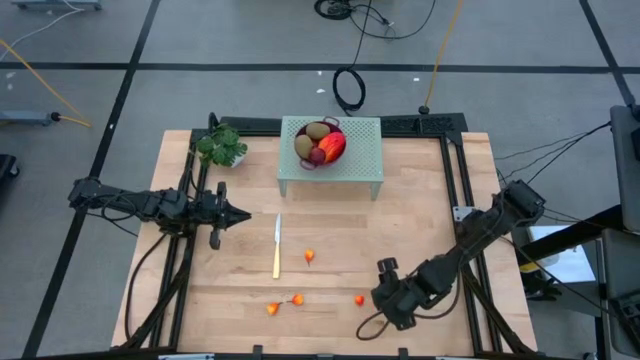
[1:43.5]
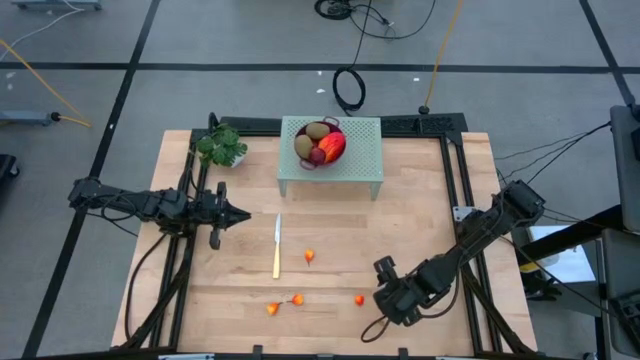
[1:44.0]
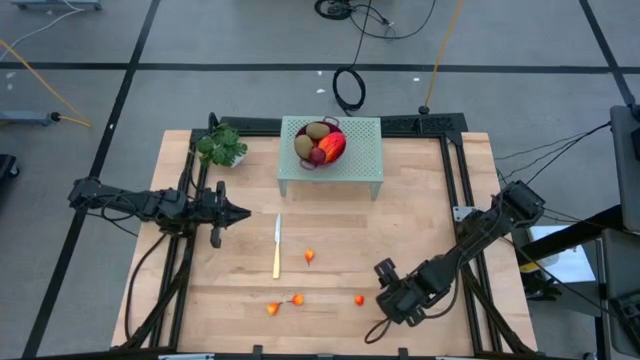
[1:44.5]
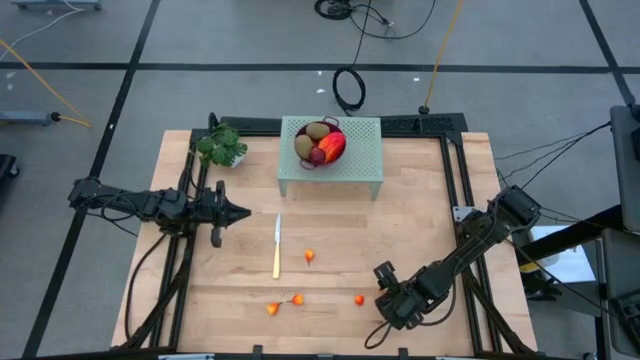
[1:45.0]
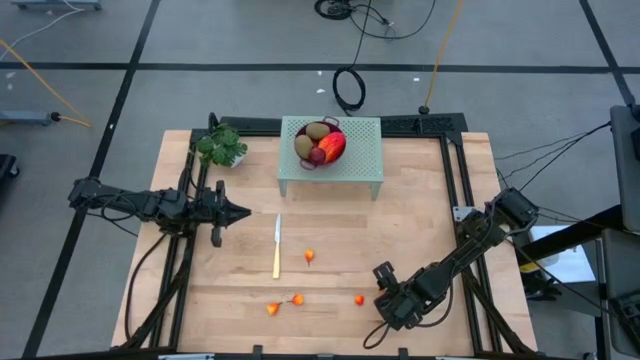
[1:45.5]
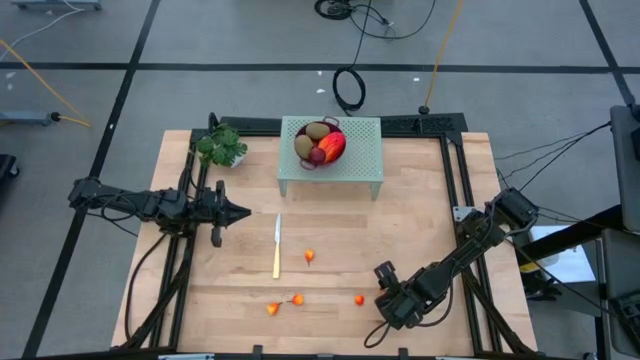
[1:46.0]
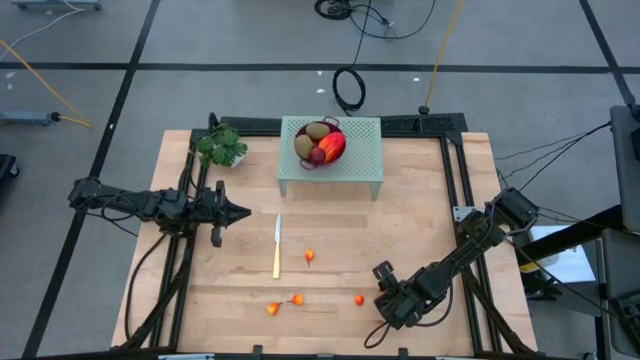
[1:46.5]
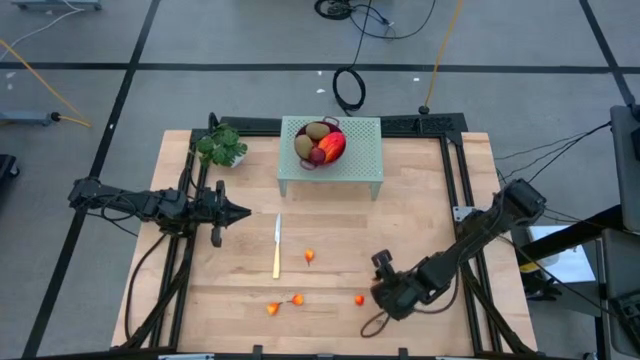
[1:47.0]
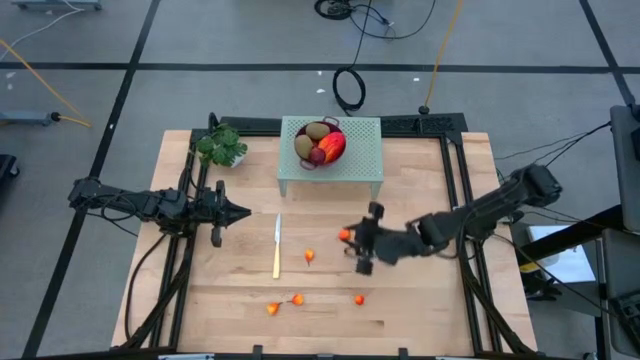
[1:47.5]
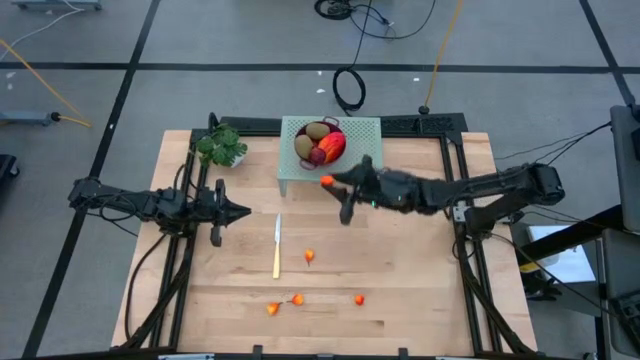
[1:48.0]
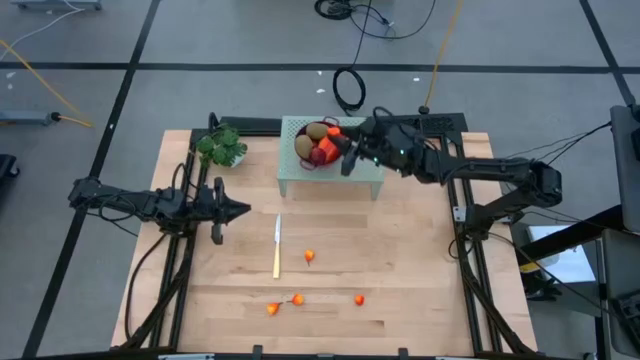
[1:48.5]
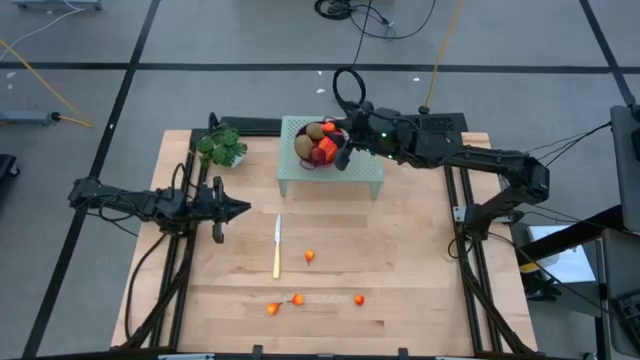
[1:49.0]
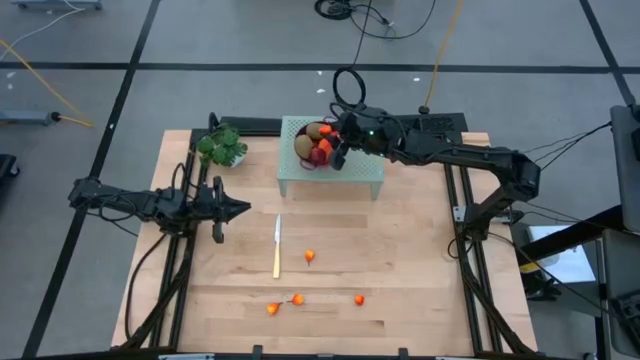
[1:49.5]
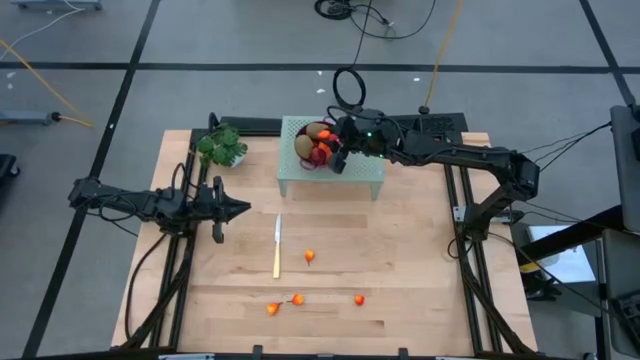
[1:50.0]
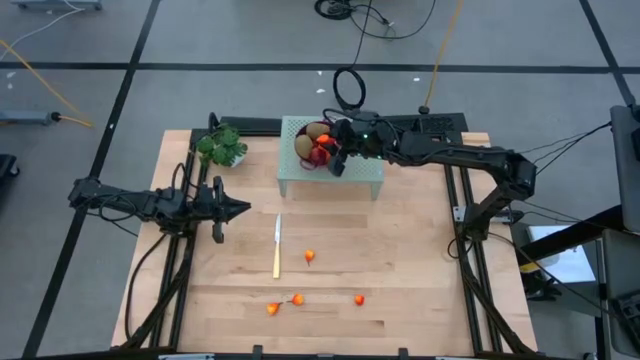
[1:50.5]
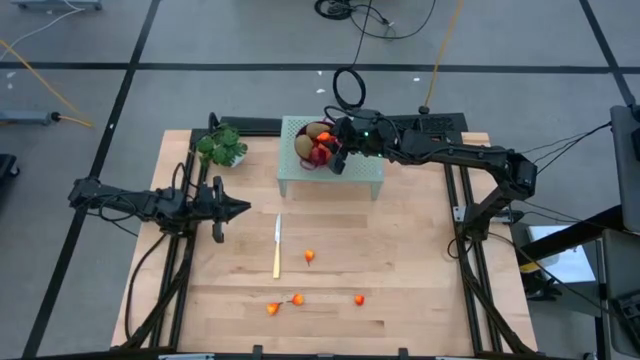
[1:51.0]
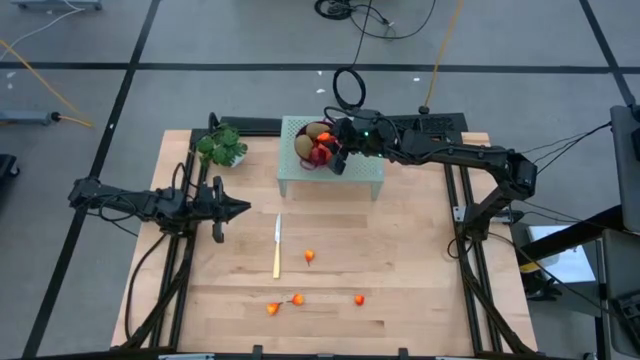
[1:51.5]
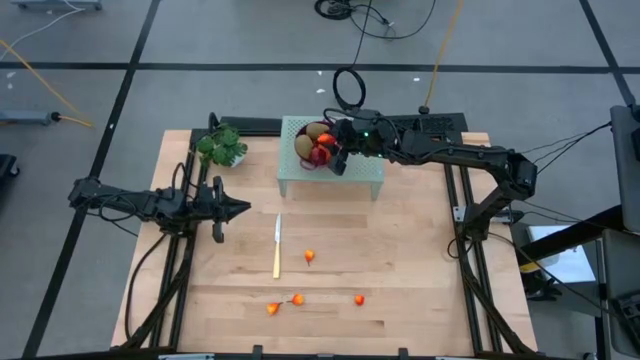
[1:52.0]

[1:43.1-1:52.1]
Task: Pick & Place Fruit
Put the pear into the strainer bowl on the shelf

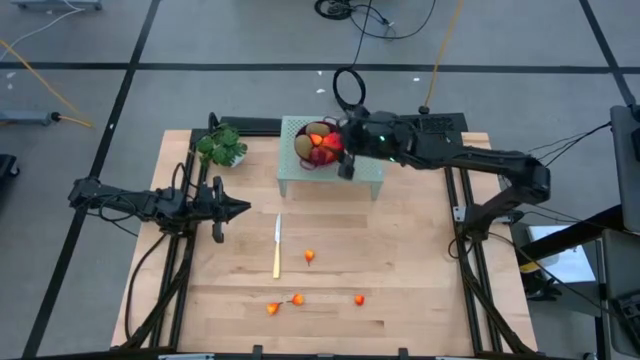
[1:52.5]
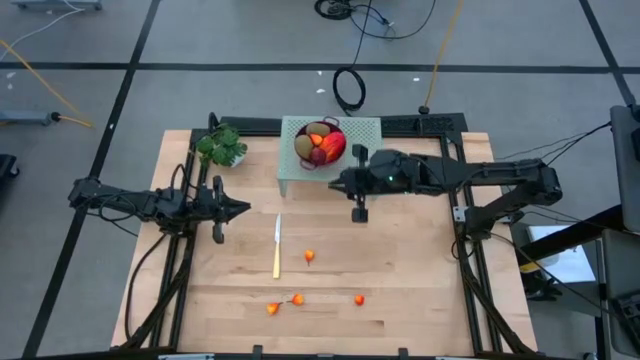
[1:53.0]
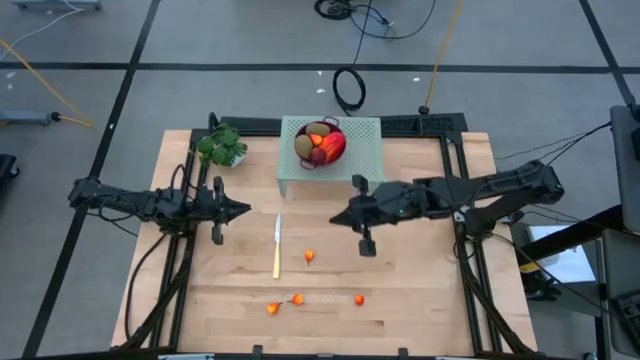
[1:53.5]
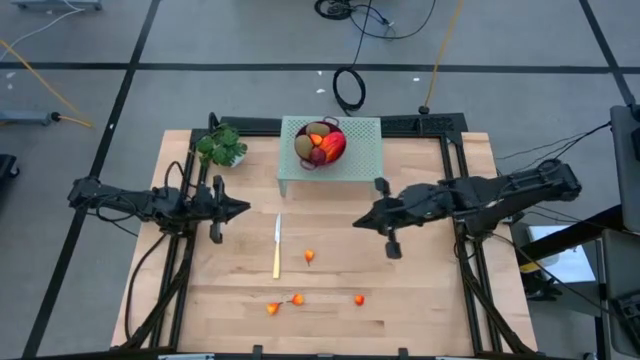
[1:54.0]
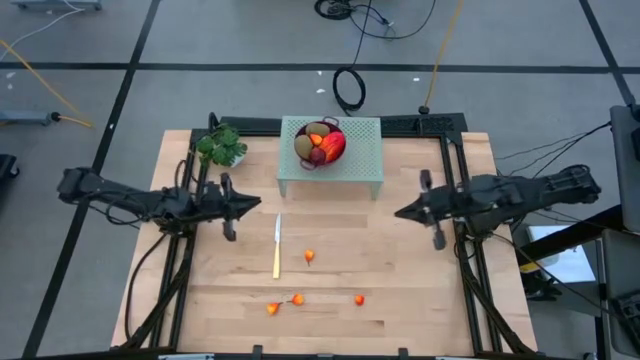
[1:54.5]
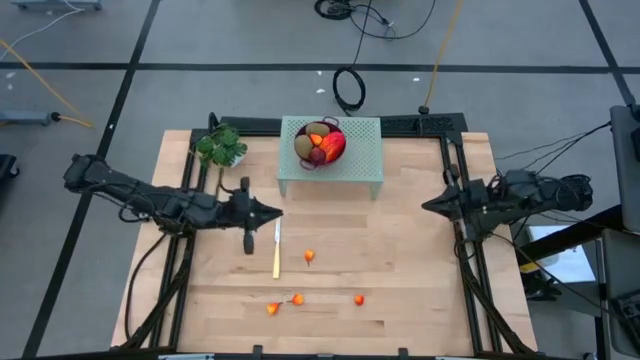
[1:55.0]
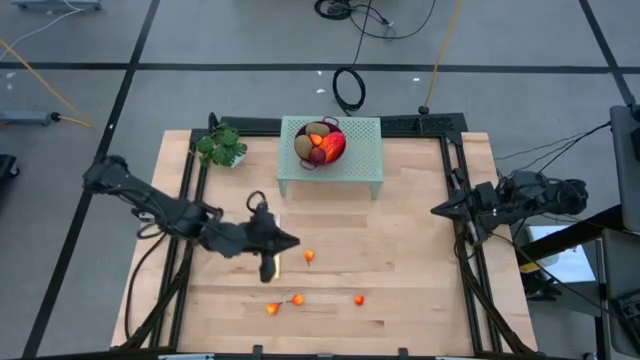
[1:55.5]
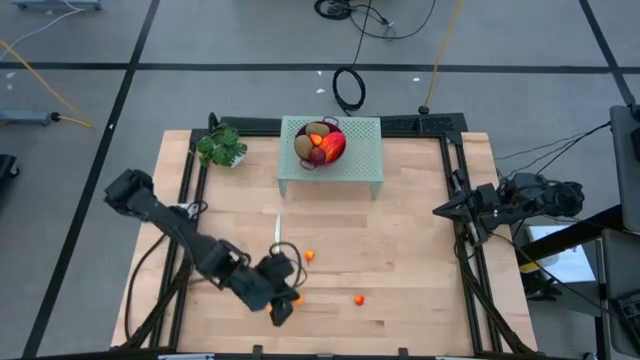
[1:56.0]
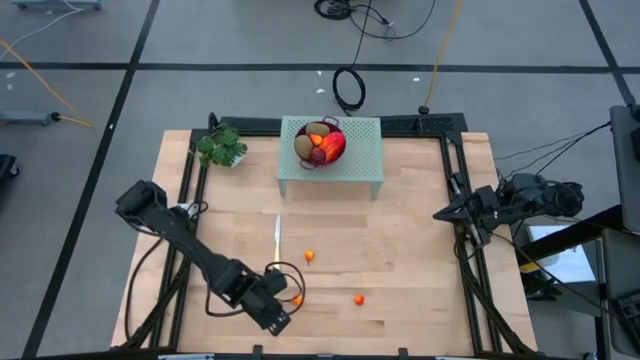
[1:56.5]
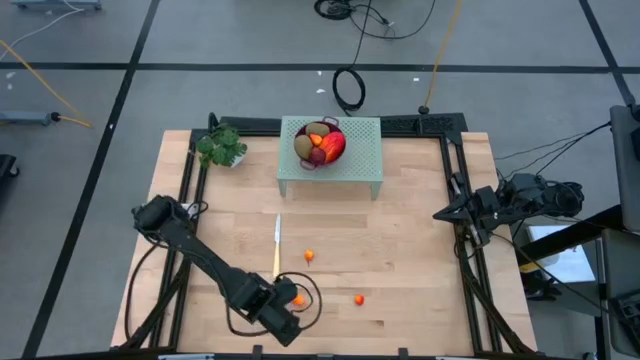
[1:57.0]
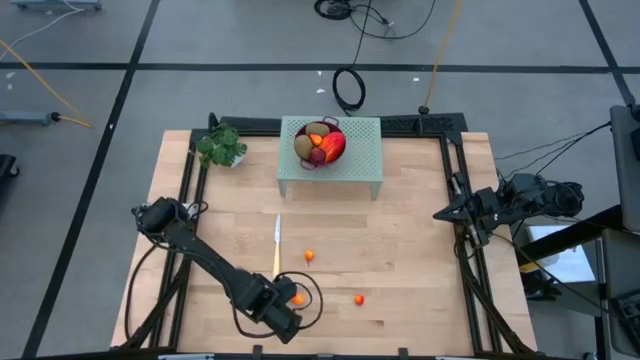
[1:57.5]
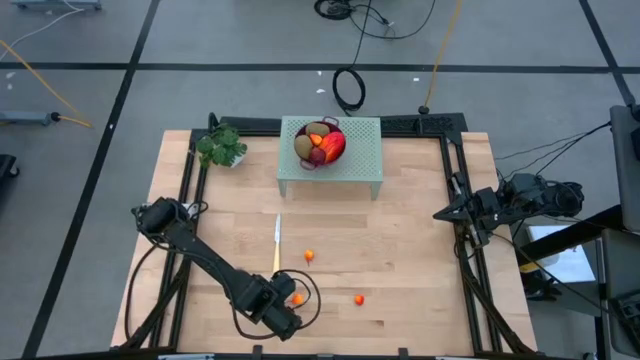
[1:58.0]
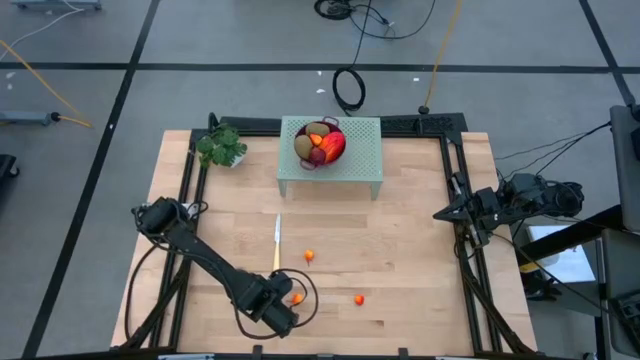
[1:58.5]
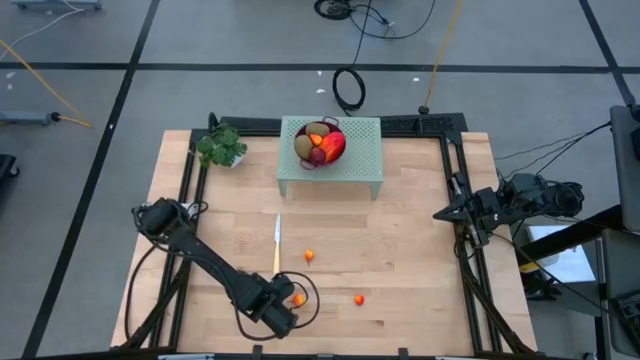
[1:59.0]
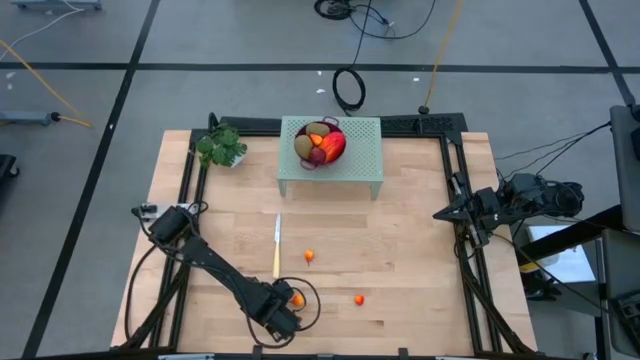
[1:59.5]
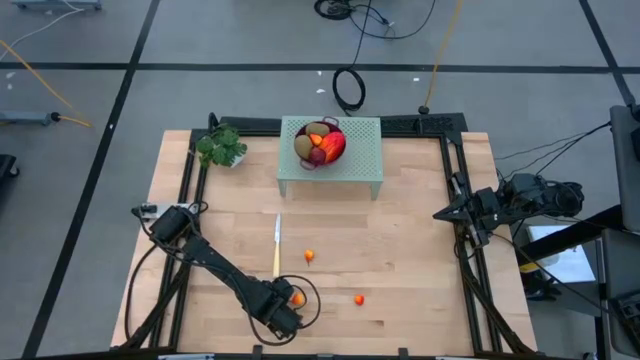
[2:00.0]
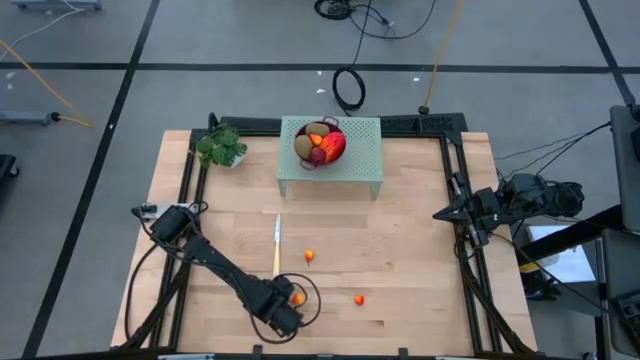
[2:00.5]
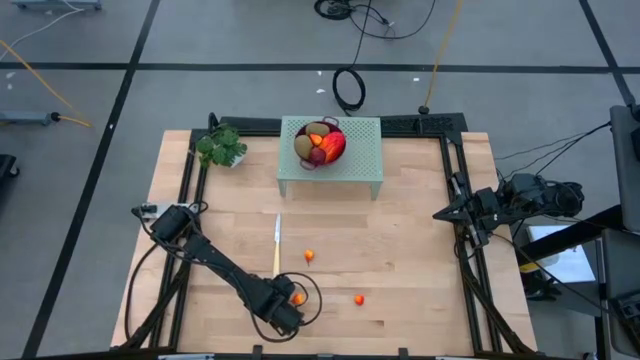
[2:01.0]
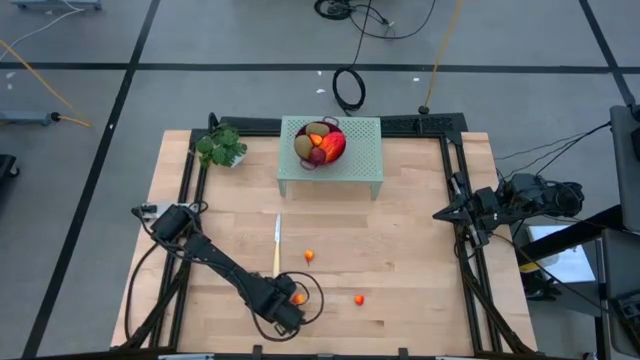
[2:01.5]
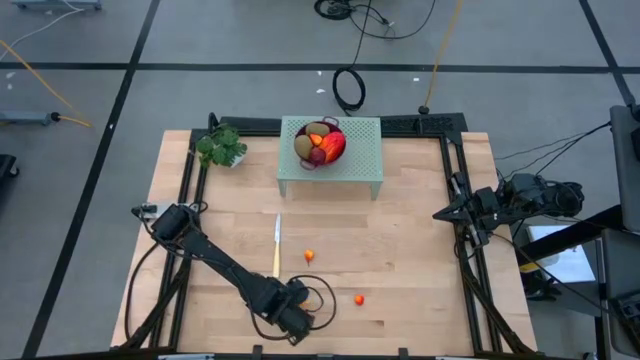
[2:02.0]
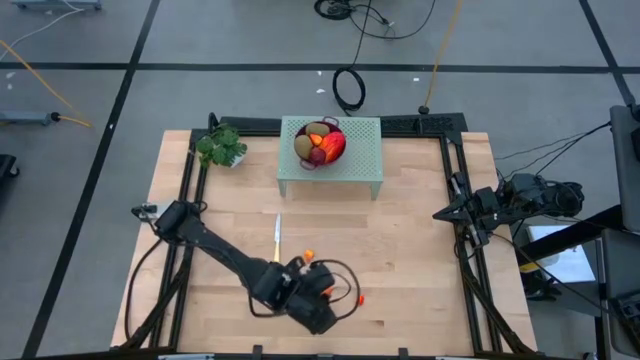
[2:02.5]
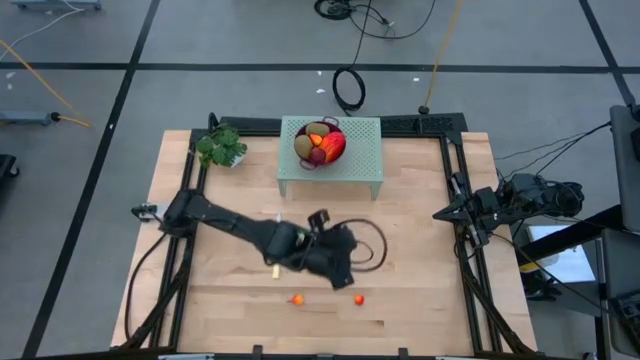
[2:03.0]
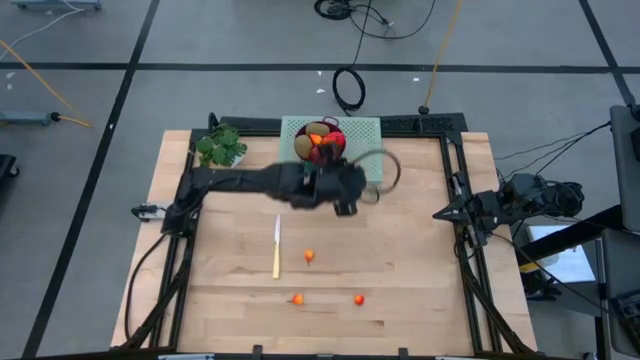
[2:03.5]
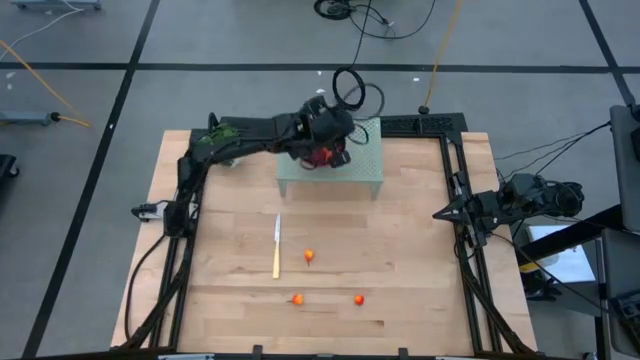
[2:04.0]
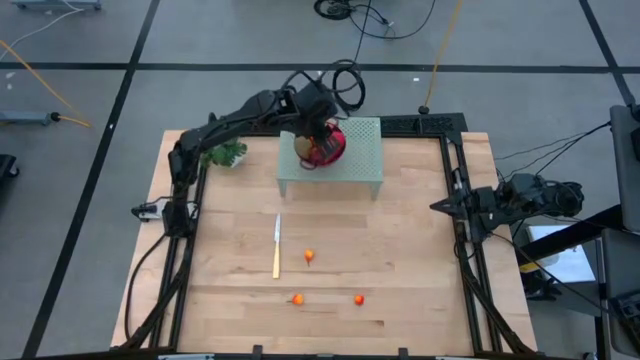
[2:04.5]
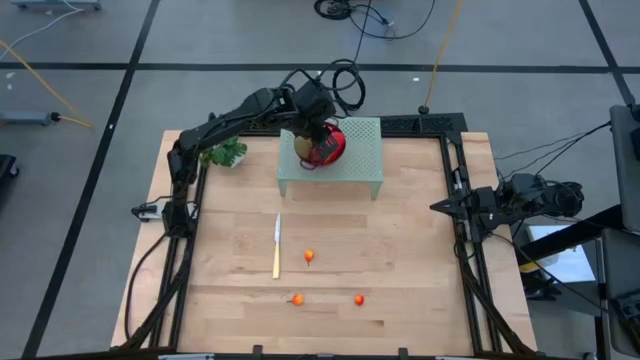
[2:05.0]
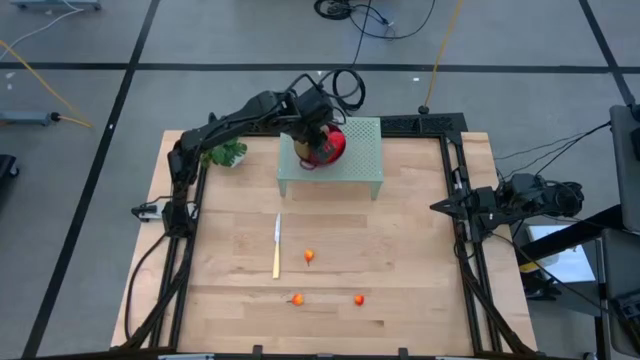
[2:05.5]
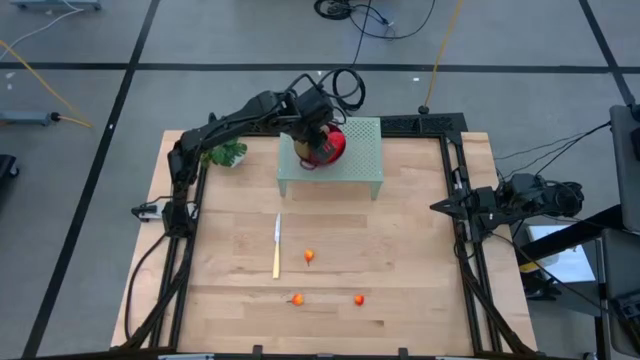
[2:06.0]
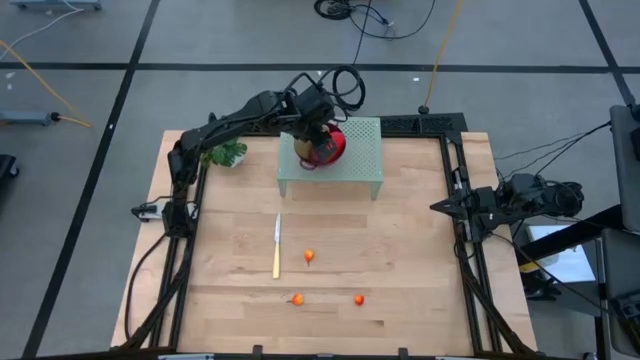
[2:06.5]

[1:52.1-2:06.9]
Put the pear into the strainer bowl on the shelf
